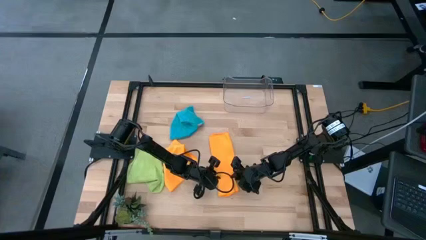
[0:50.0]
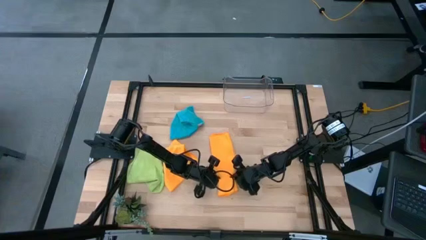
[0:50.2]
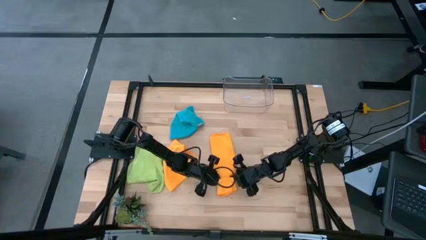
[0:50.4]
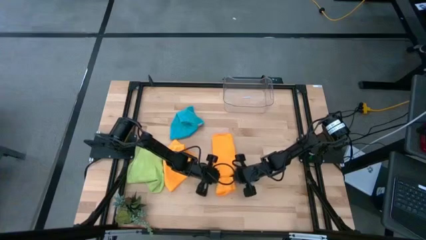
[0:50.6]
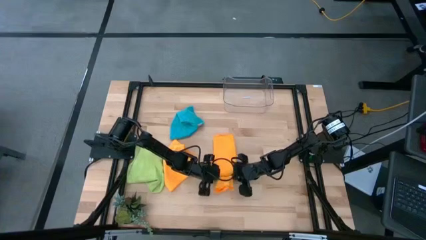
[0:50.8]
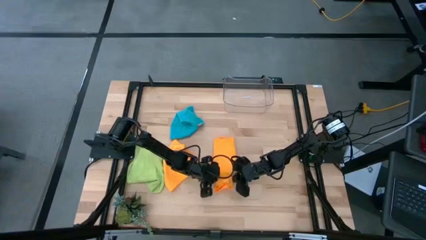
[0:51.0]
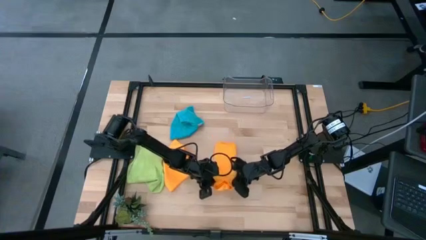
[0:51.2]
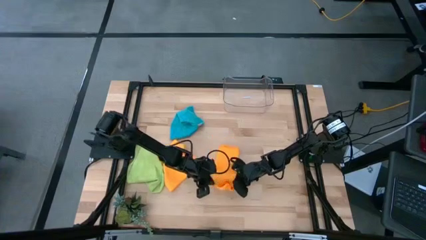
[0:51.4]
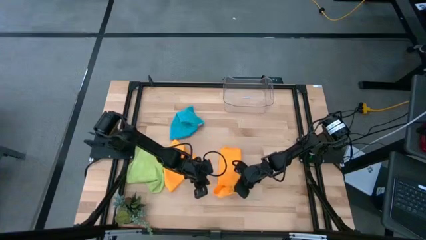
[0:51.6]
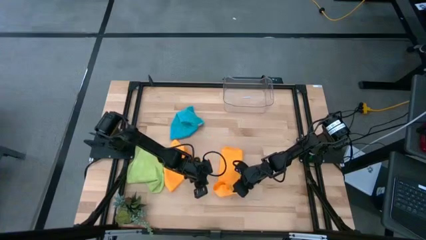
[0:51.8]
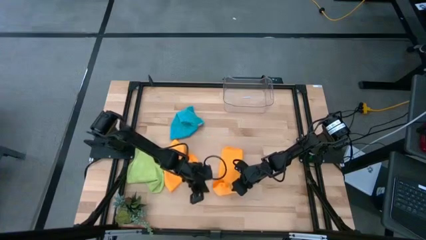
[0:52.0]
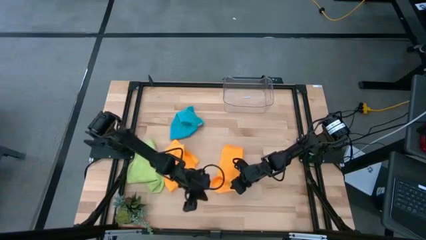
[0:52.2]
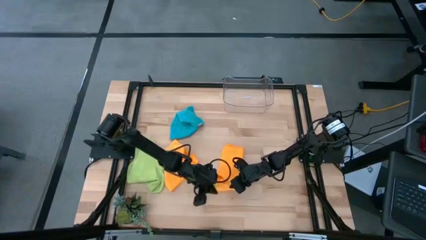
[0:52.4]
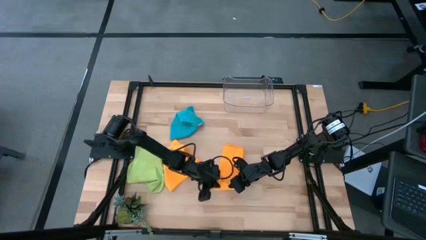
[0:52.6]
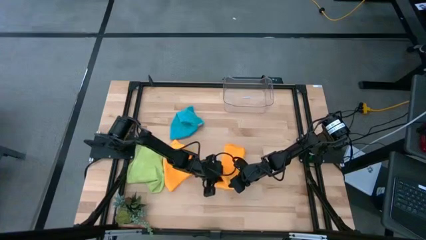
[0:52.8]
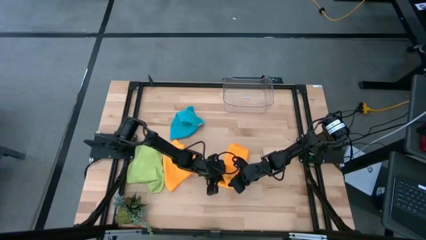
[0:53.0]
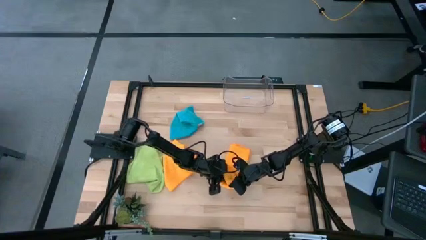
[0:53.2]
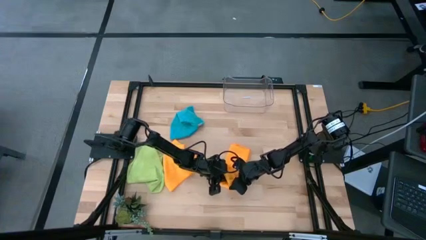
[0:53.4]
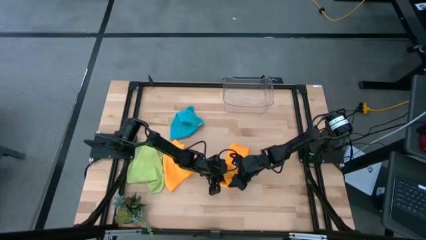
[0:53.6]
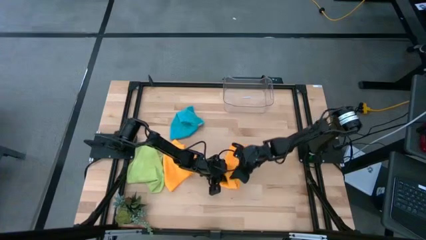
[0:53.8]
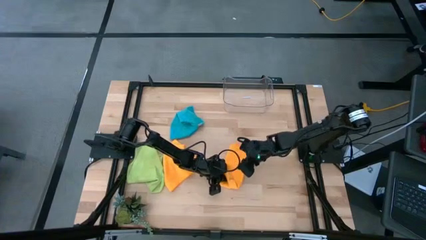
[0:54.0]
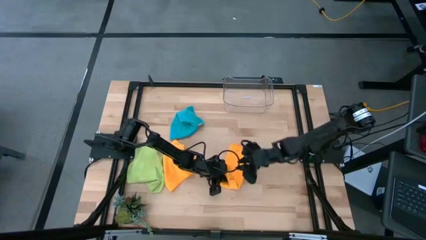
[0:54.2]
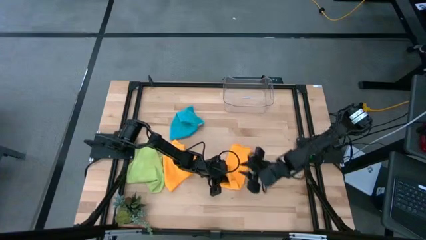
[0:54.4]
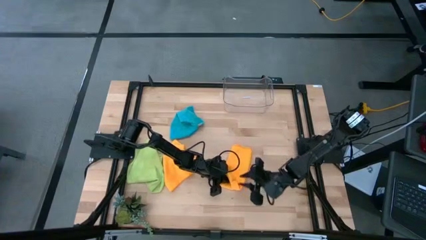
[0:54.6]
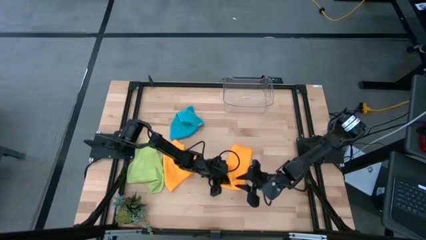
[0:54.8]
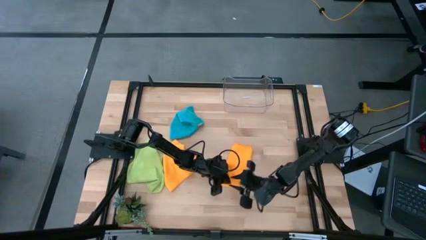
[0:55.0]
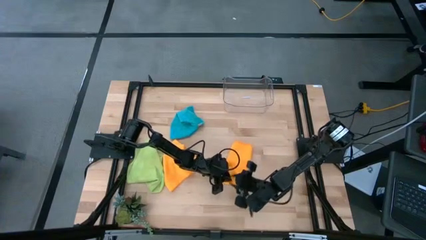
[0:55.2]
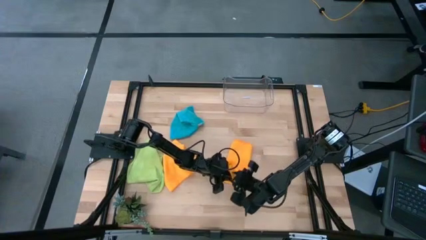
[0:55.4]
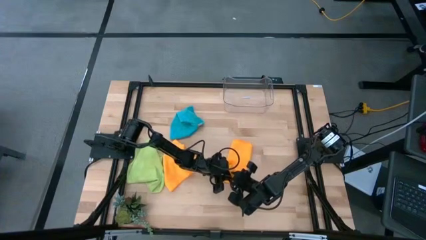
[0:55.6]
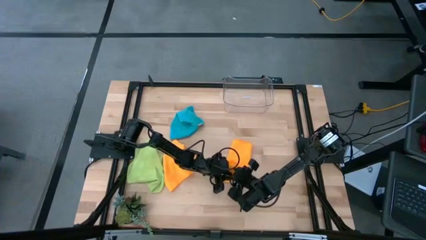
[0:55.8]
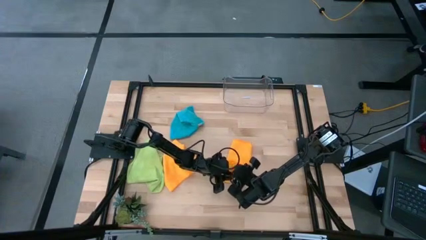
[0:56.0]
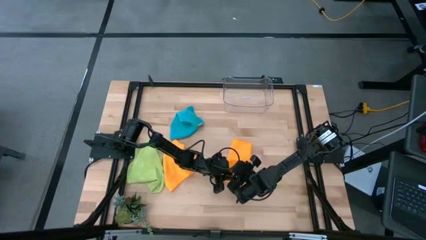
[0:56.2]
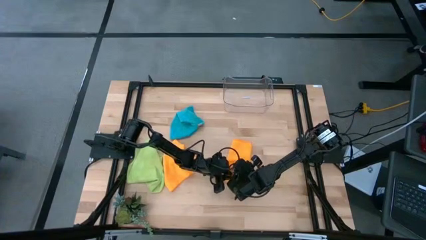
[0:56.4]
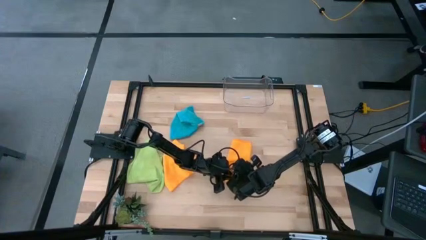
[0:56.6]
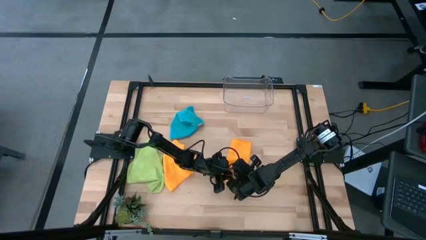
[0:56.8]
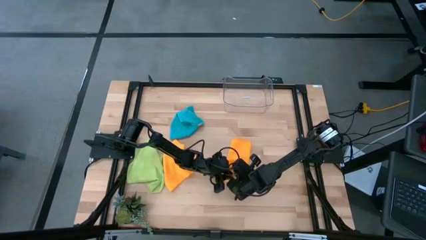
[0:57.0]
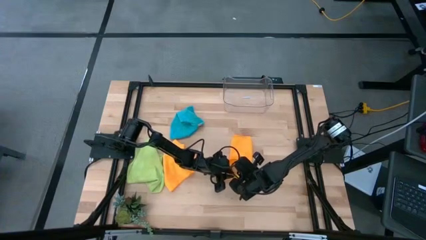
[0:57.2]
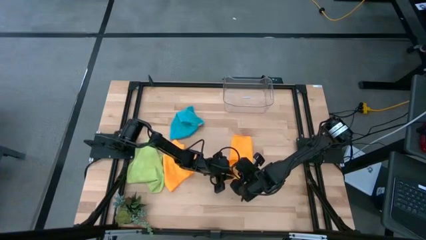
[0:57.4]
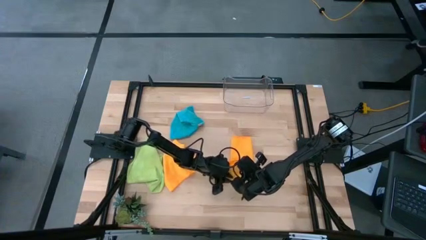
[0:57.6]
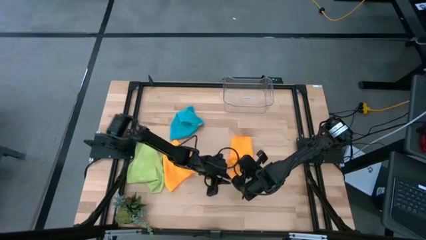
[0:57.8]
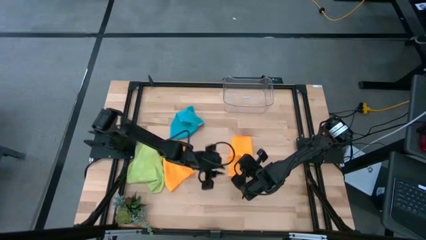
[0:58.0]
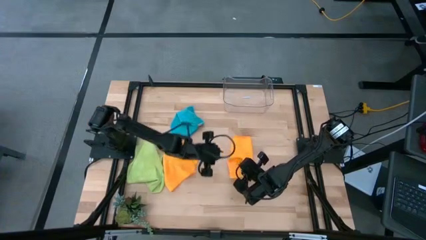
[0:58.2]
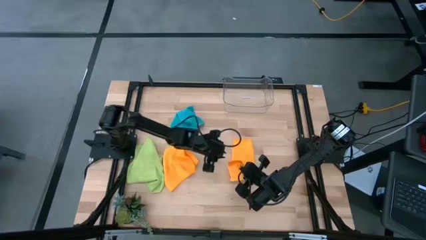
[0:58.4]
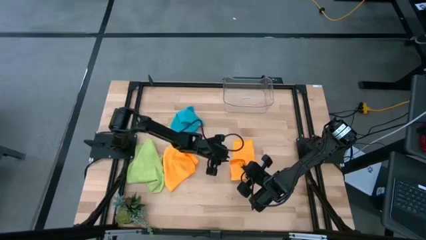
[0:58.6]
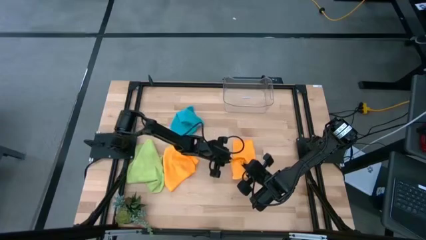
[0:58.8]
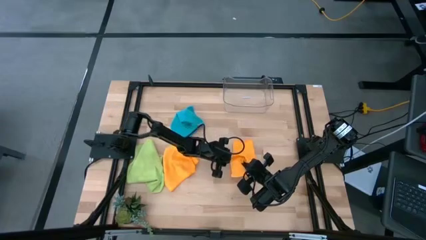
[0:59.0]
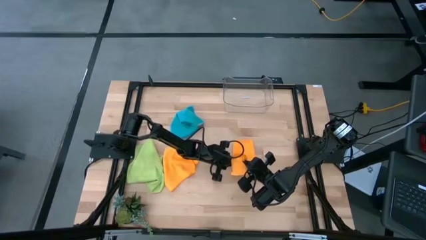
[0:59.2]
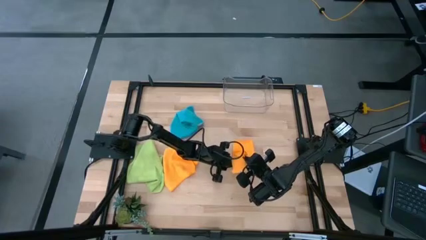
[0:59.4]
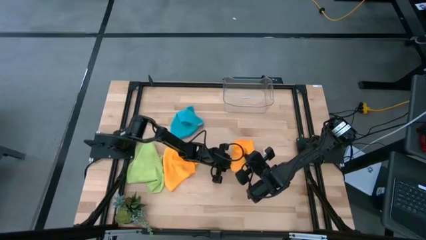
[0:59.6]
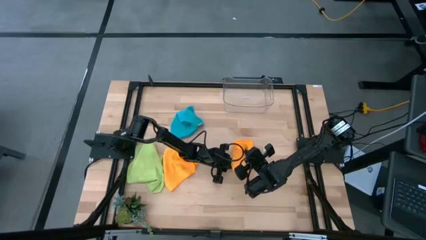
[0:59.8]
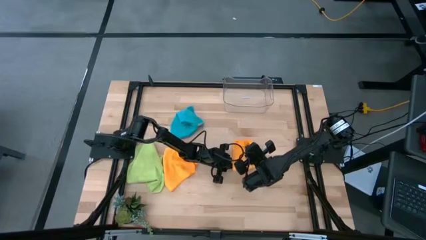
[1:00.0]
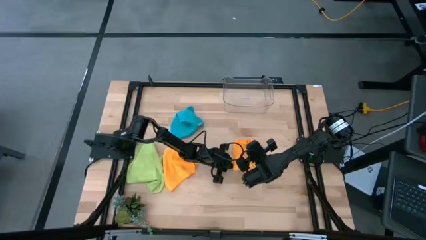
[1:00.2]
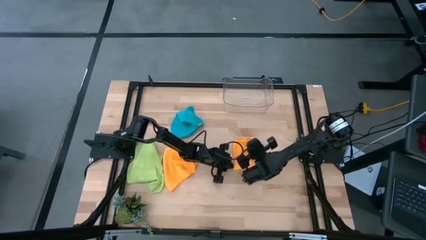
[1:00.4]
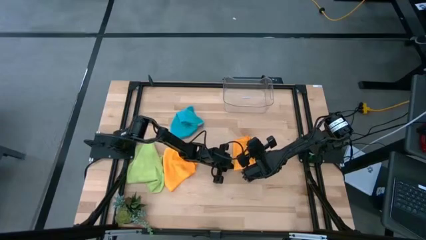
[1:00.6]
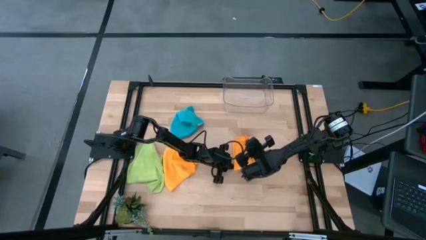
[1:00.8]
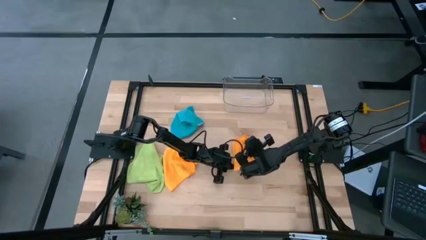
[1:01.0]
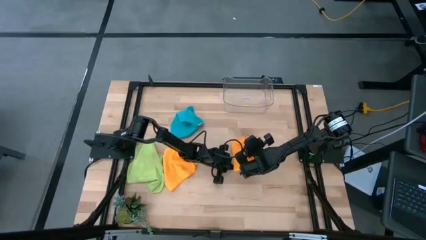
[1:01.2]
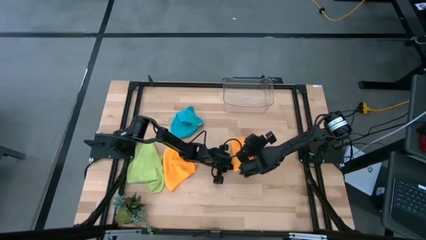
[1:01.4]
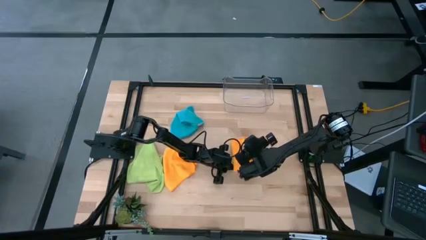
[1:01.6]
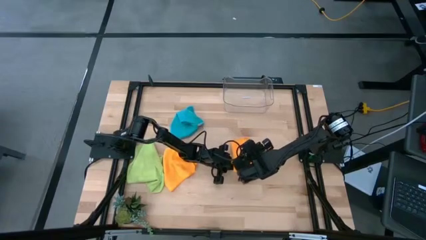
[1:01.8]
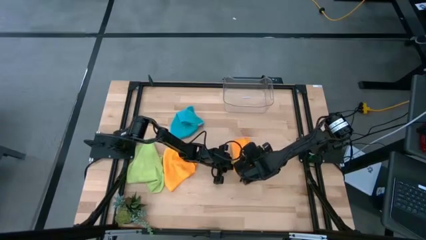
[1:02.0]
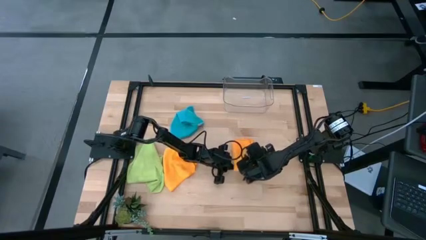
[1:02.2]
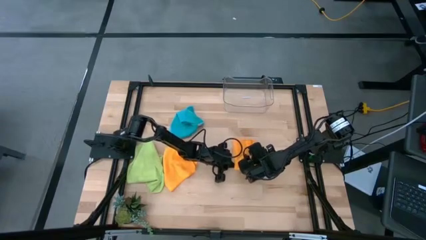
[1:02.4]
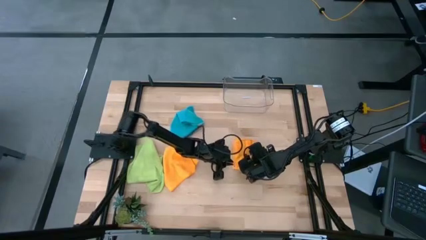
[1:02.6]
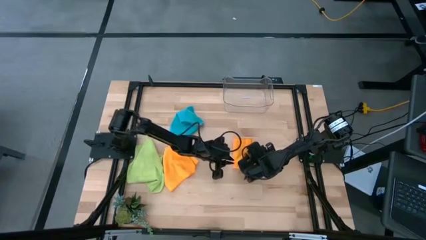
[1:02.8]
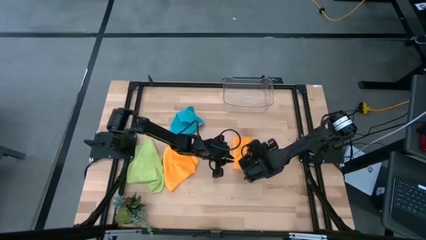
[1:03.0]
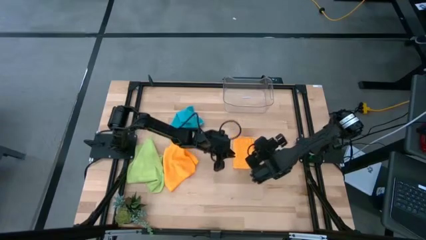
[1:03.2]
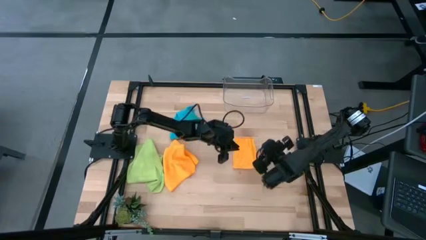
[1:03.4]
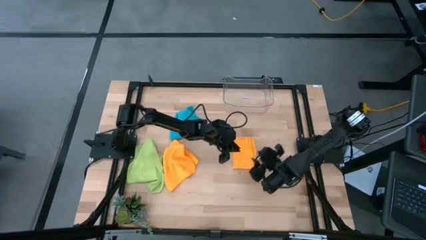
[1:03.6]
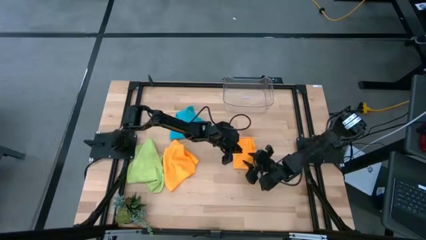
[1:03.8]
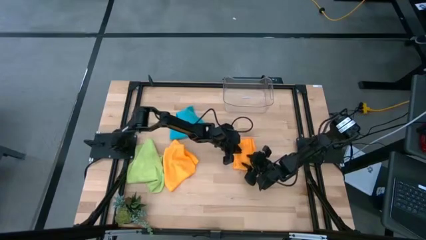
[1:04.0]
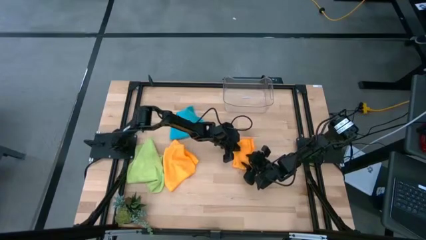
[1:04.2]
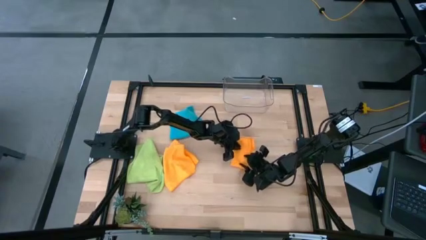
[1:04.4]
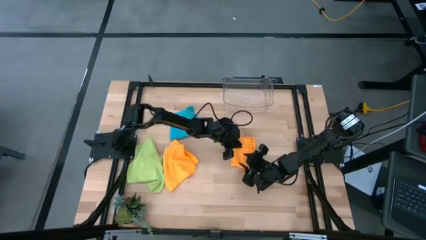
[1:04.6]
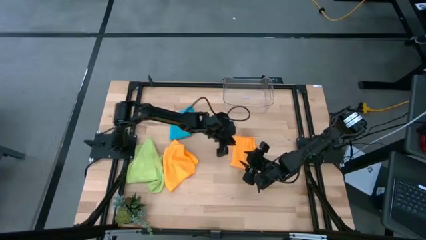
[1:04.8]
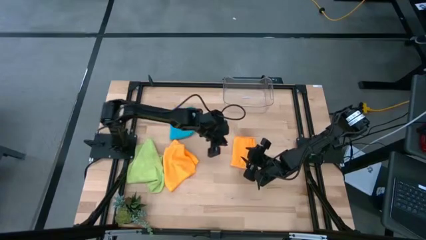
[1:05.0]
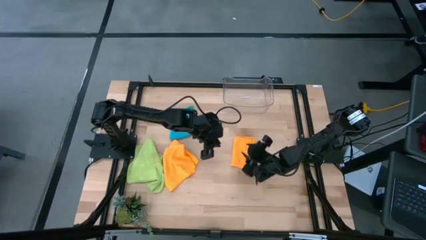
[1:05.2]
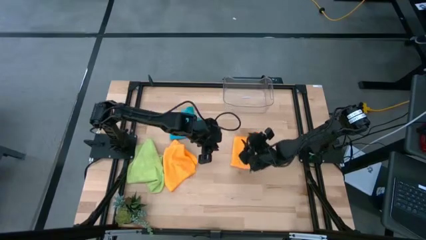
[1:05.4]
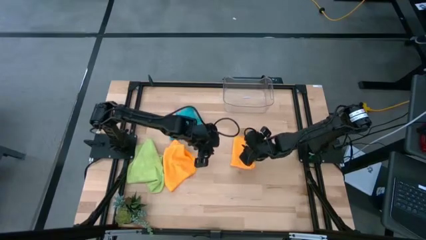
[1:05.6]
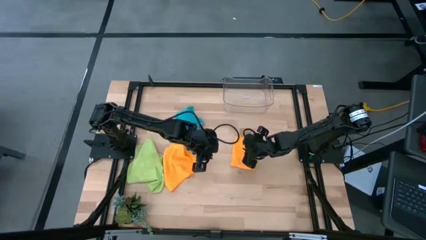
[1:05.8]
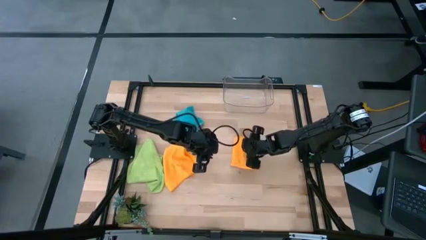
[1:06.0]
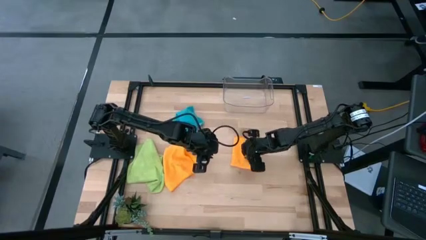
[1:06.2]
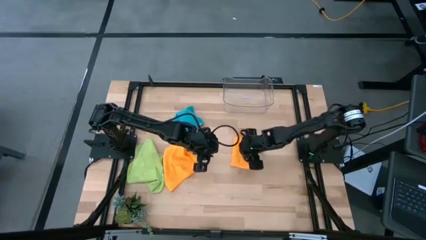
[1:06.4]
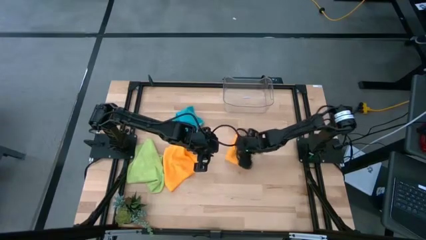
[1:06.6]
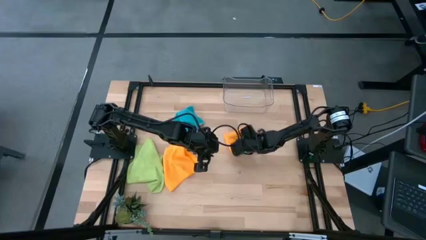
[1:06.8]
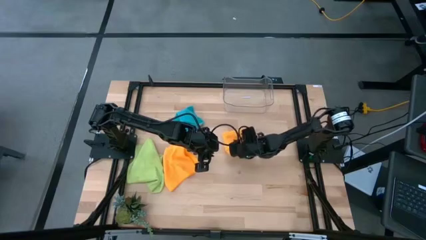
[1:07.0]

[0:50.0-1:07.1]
Task: Fold microfiber towels
Fold the right orange microfiber towel
